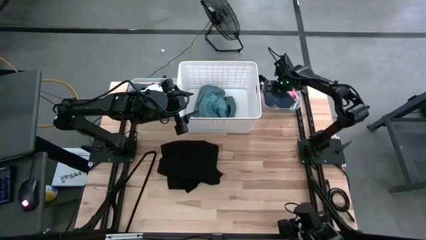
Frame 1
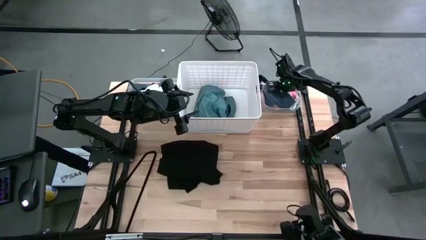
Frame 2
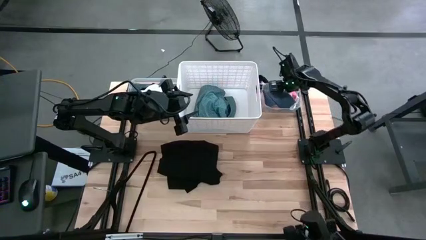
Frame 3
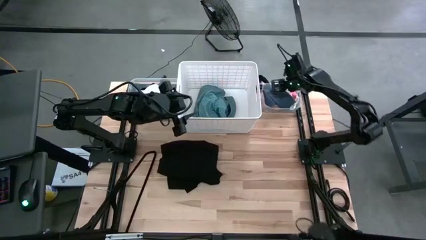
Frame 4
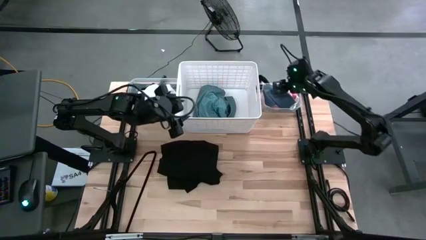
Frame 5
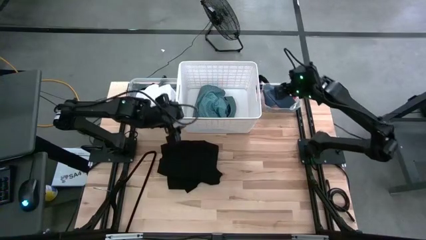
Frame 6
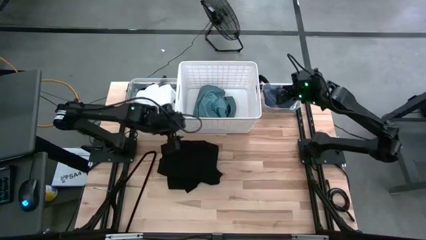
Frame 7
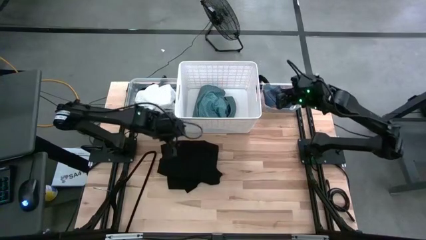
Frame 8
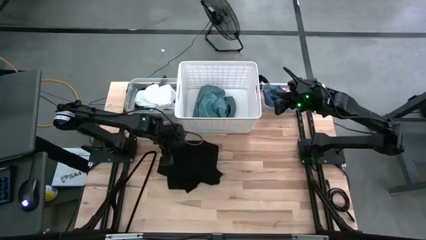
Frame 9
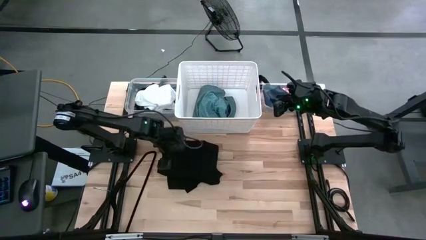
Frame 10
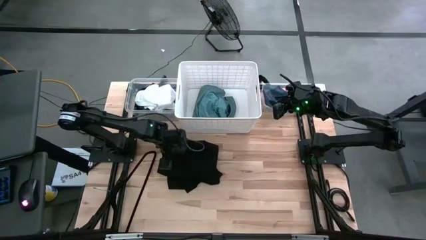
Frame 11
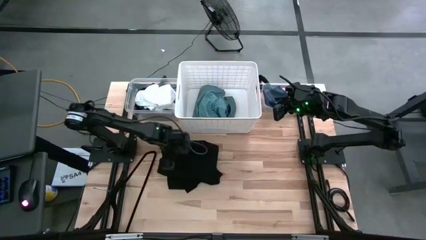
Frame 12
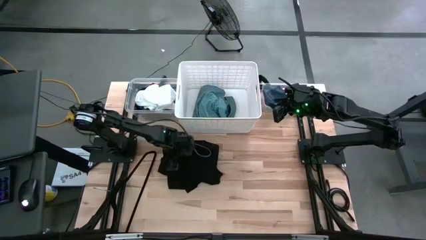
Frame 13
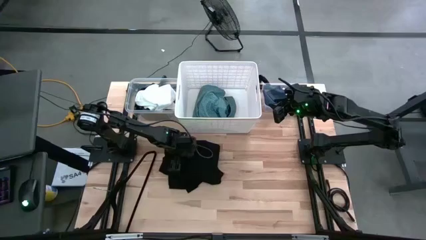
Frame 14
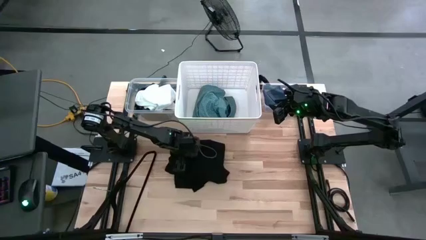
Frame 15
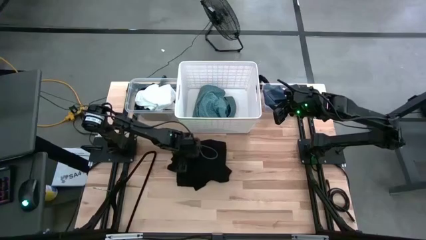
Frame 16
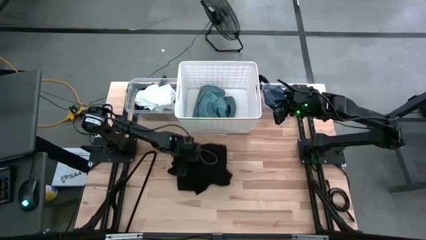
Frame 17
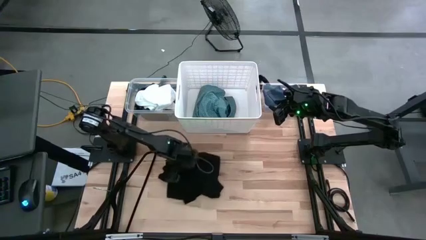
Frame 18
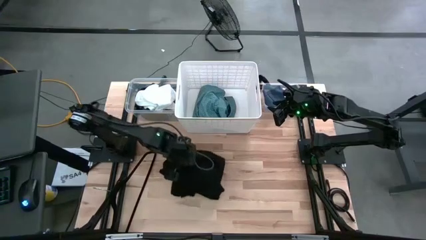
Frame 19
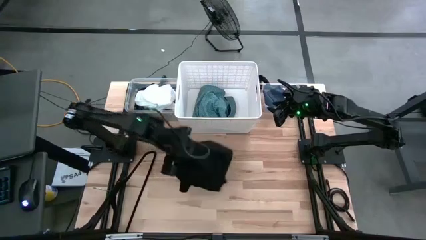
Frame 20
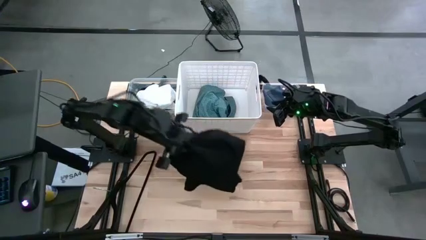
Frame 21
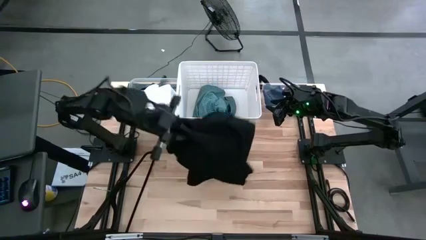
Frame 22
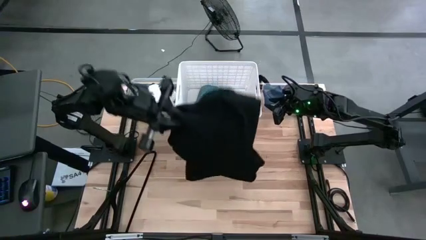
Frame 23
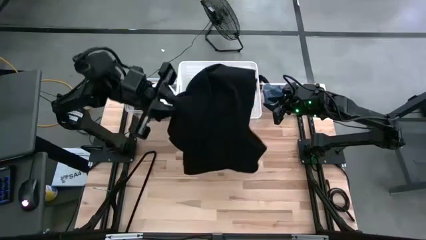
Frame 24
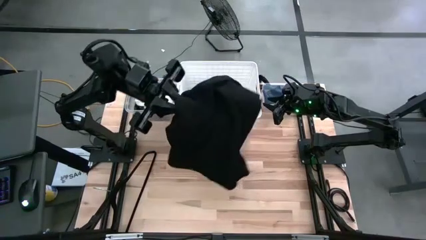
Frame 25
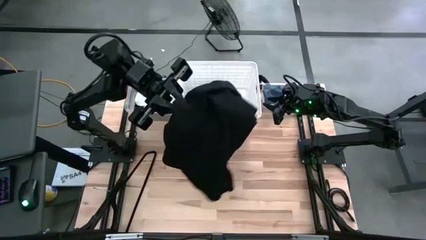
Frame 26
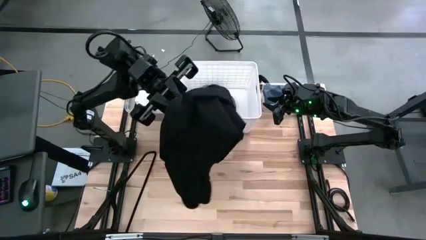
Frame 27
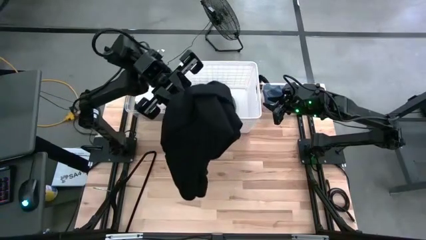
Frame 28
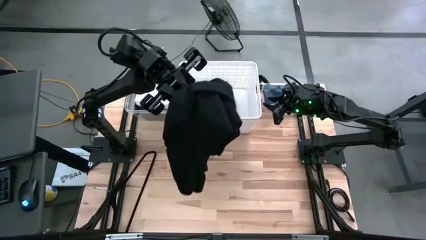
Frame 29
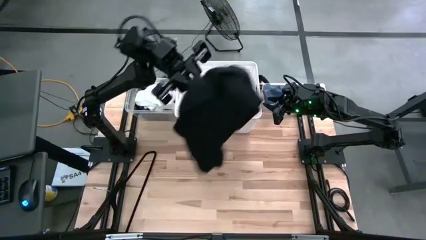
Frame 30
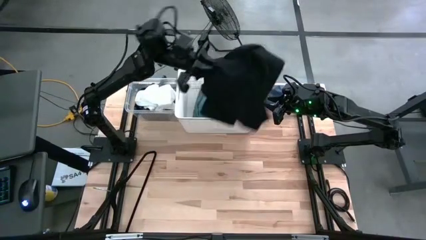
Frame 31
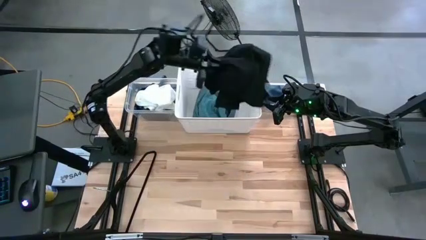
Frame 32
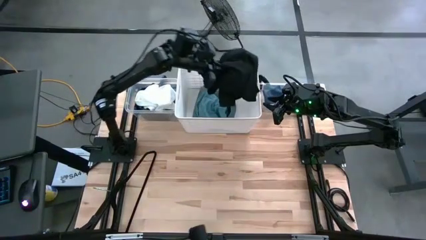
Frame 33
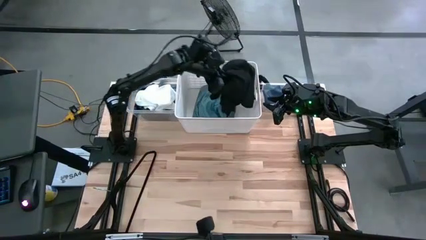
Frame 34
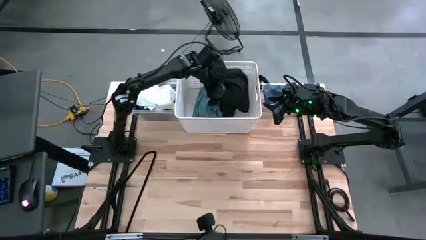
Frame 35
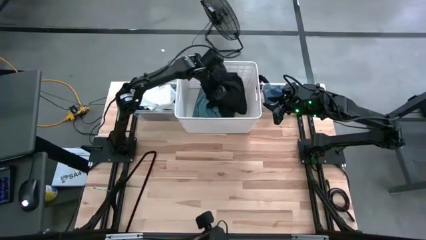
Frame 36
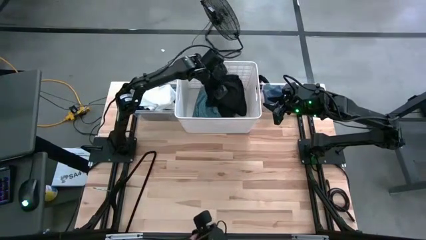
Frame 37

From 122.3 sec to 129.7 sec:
Task: Pick & Place Cloths
Put the black shirt into the white bin

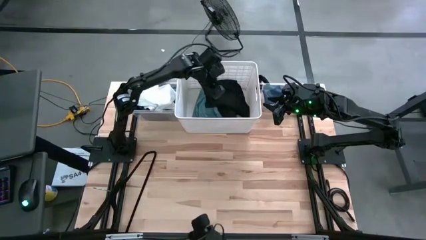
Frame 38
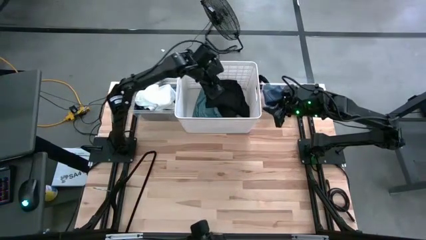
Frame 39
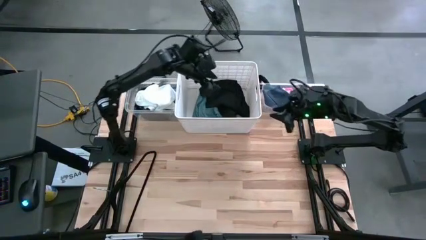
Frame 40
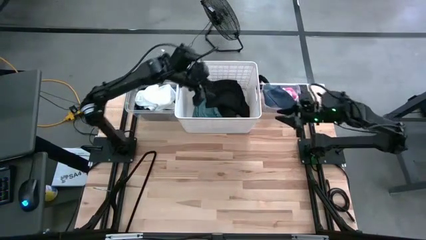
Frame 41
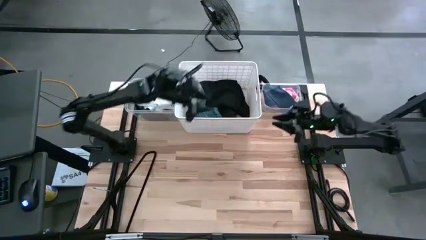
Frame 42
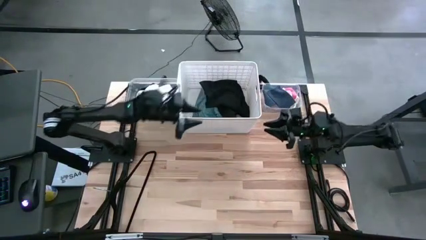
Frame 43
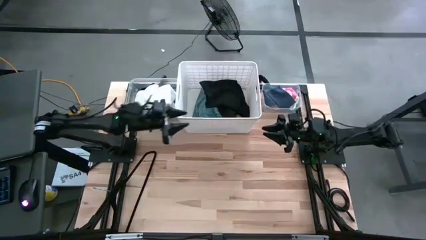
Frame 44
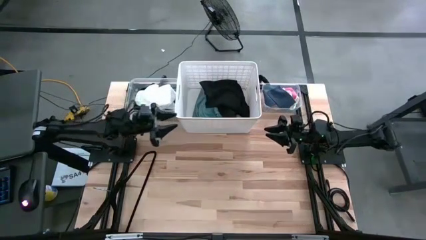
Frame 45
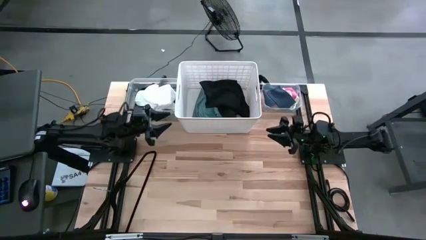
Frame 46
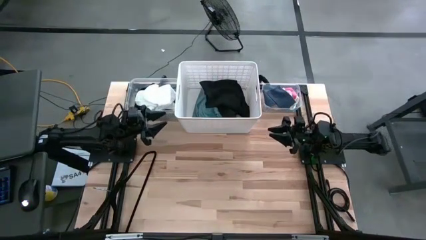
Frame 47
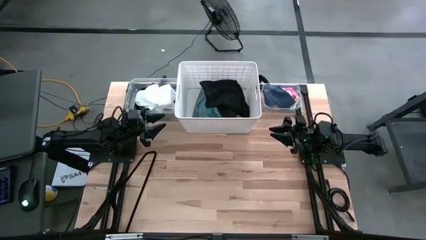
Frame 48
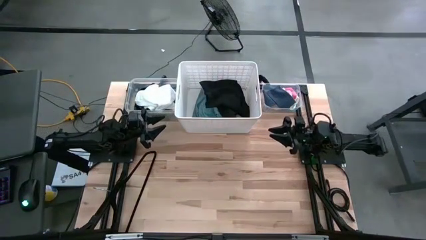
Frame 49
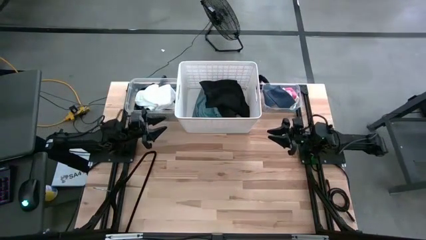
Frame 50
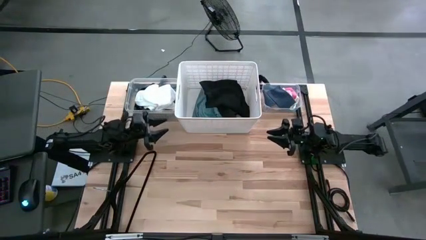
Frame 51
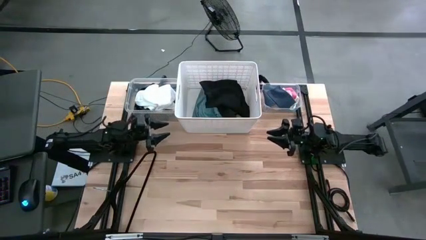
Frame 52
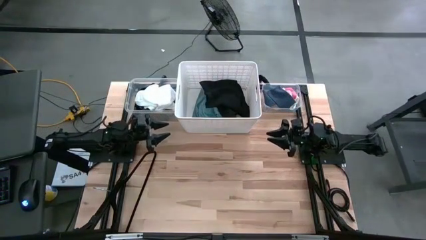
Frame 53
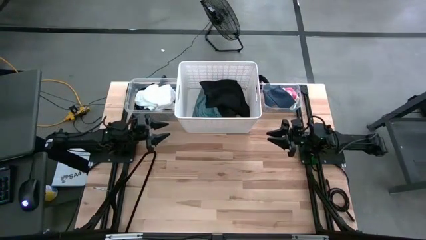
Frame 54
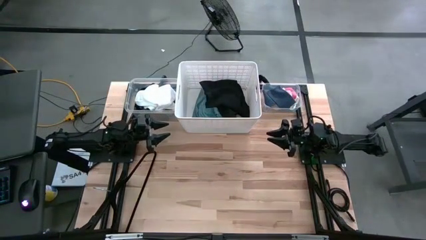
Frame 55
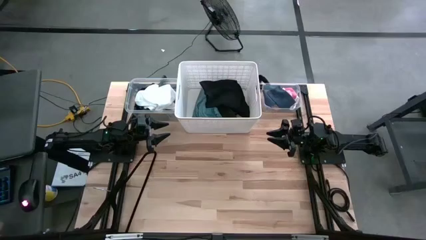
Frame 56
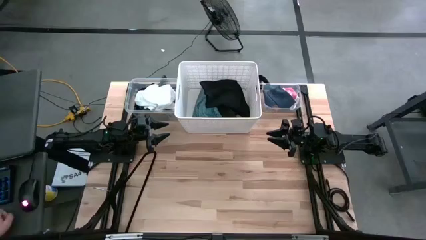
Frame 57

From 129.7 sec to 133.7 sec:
Return to Home Position

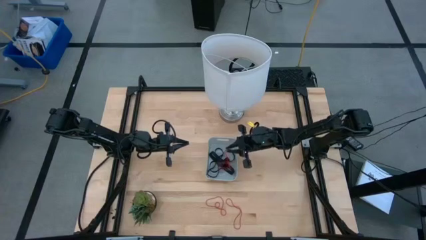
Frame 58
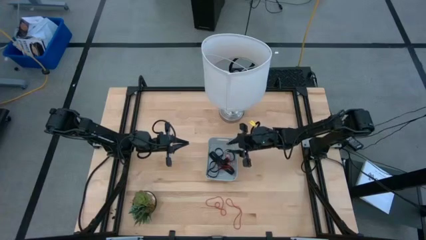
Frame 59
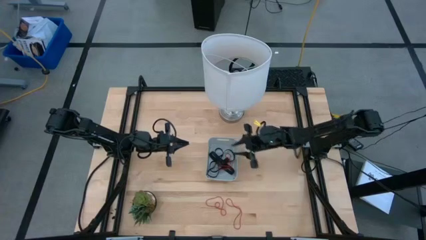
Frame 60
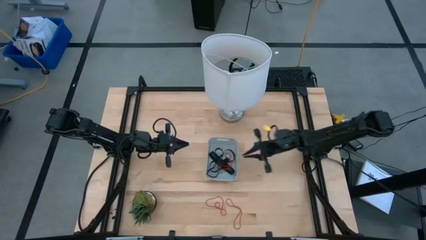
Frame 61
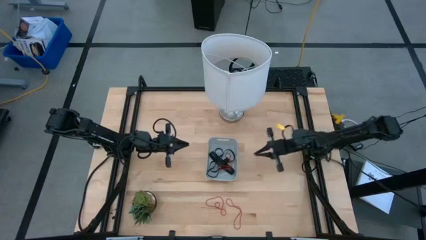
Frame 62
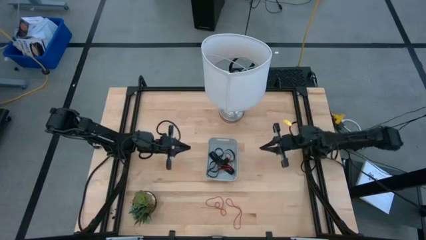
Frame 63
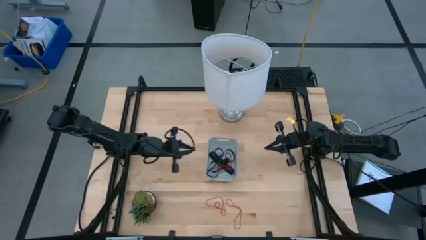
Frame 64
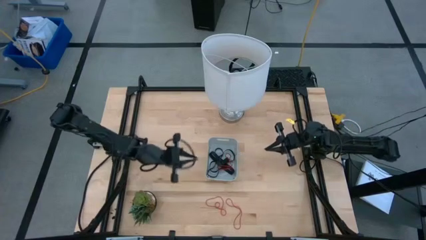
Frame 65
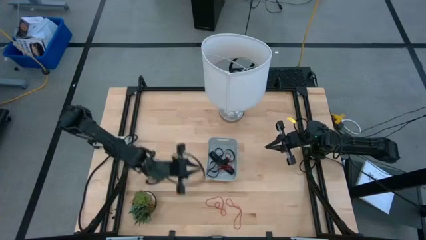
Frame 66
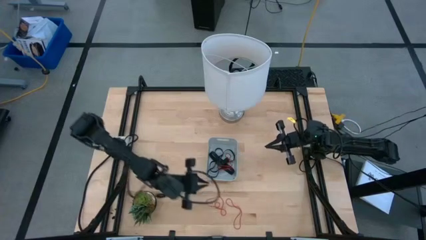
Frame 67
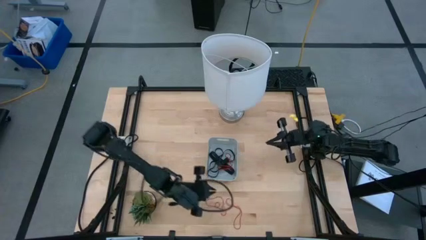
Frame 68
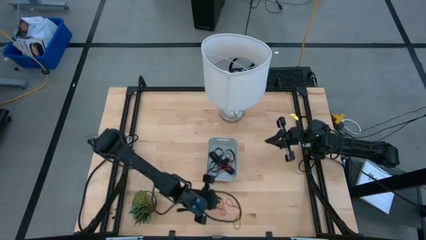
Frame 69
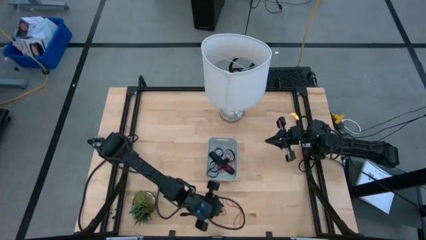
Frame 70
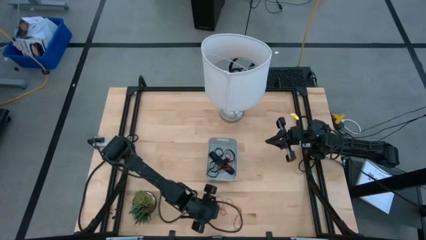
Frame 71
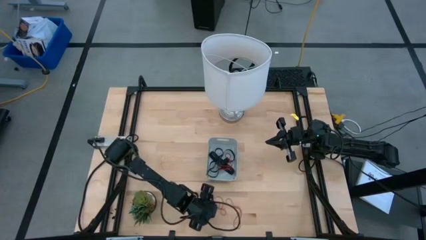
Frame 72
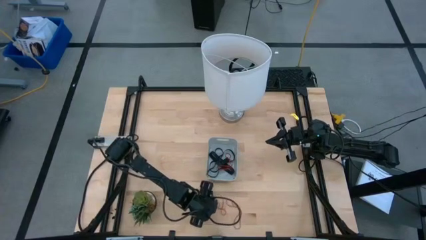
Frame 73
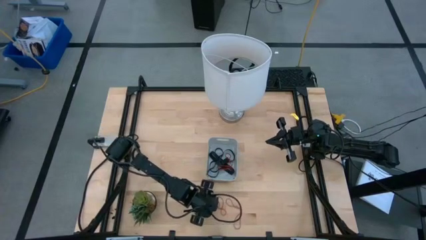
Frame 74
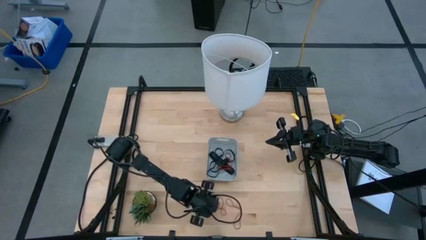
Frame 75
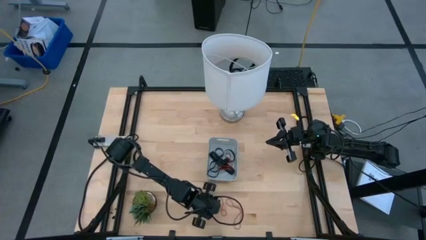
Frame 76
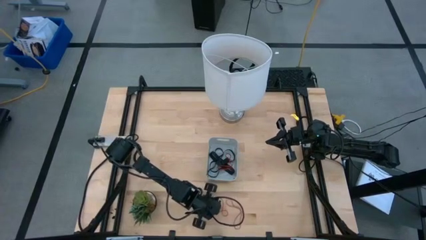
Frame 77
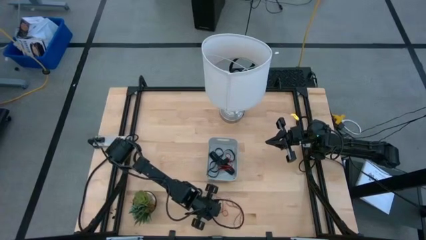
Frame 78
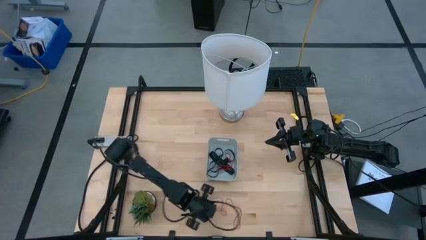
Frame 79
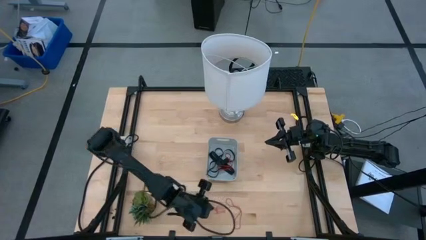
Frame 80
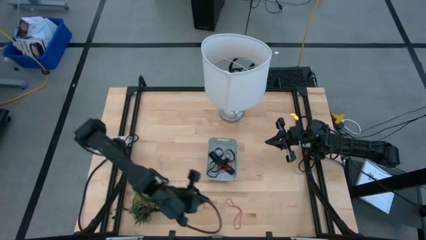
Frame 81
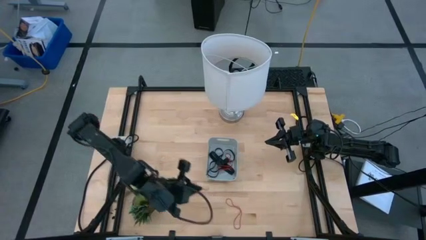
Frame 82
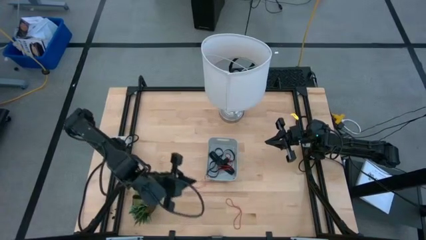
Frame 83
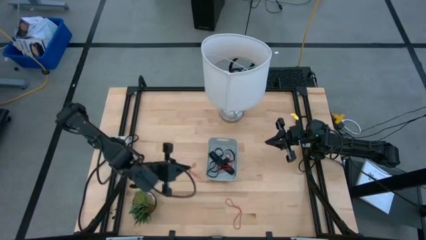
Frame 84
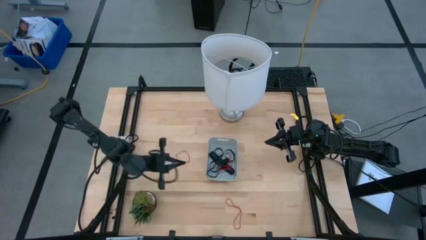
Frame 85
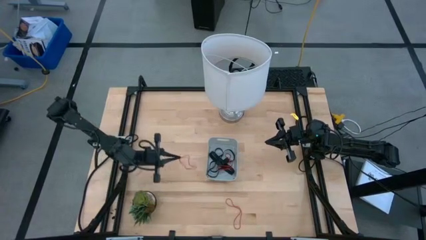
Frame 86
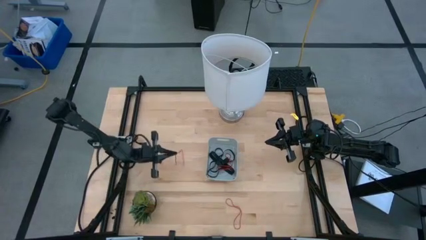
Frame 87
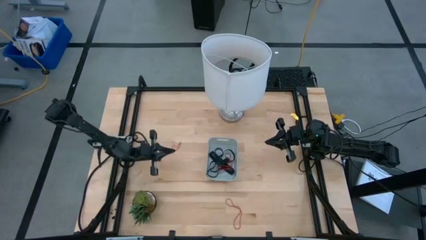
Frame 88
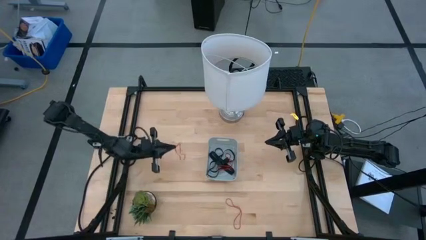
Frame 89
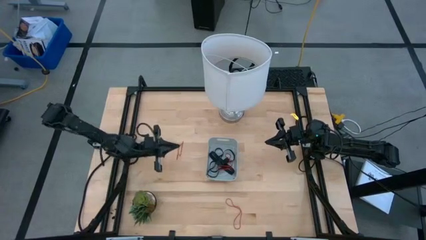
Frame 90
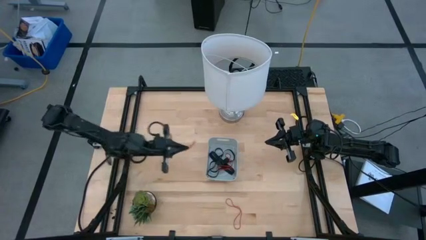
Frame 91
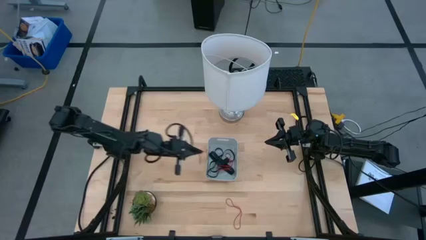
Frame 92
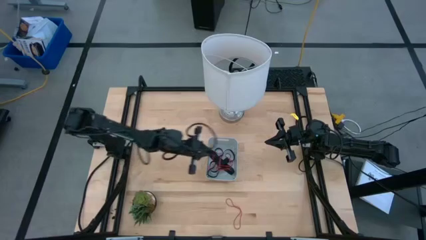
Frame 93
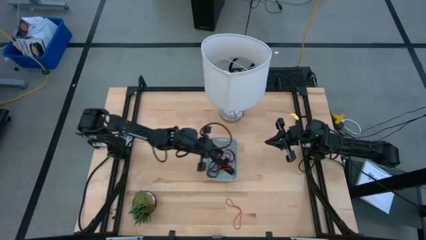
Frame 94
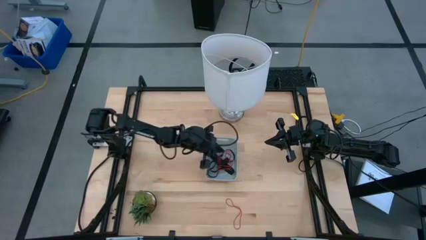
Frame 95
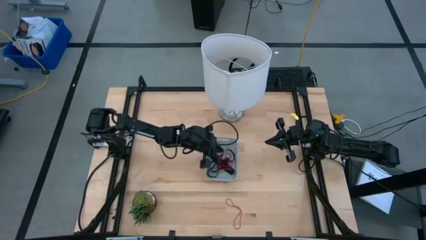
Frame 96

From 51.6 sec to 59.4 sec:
Task: Pick and place rubber bands into bin
Put the red rubber band into the gray bin
